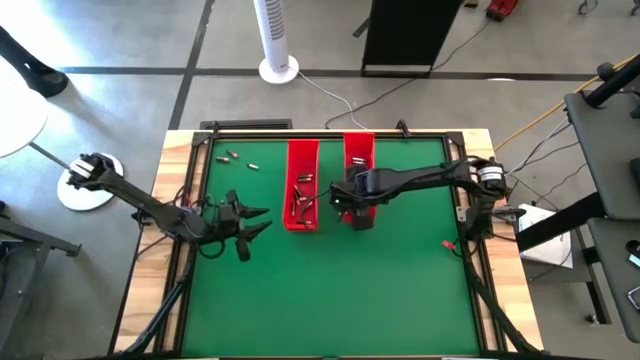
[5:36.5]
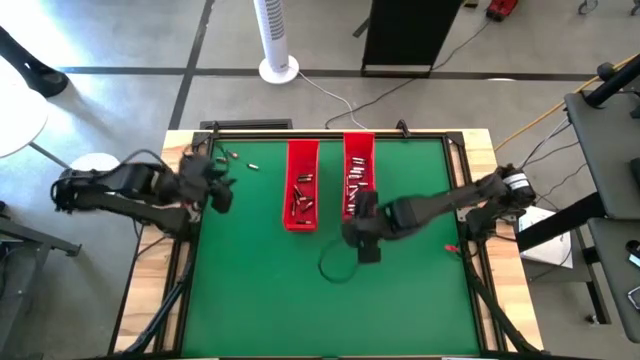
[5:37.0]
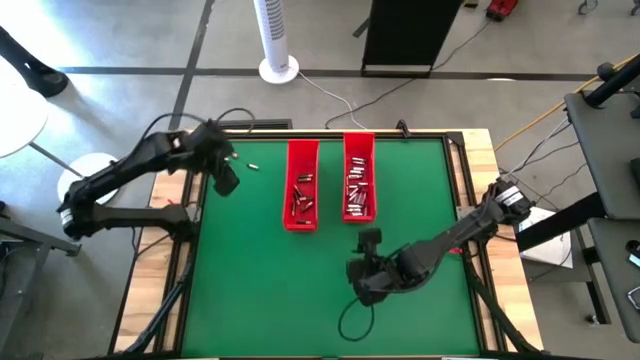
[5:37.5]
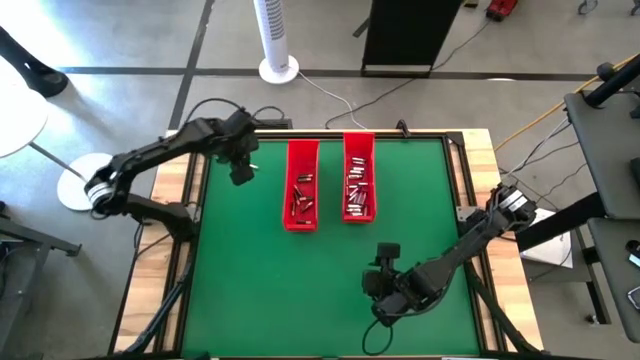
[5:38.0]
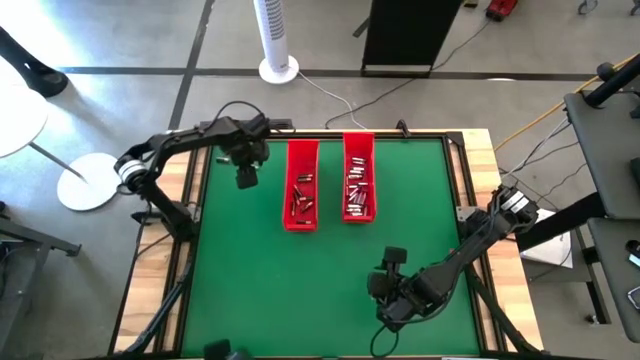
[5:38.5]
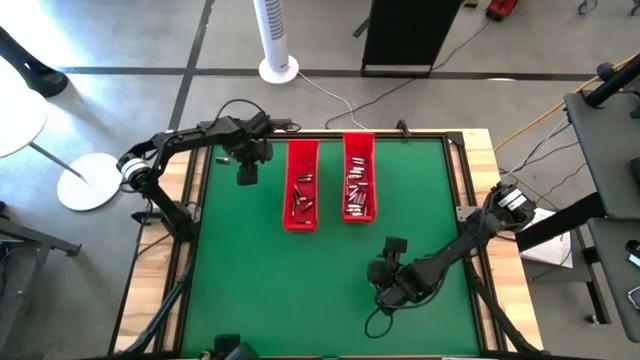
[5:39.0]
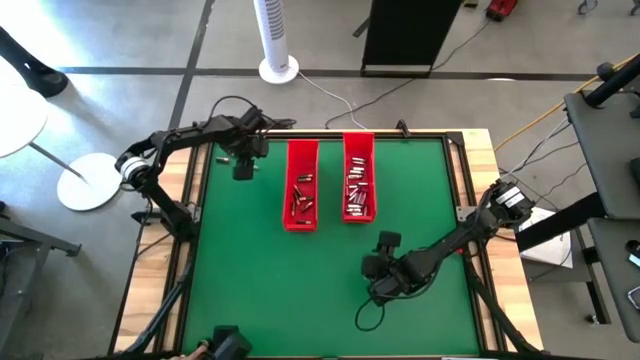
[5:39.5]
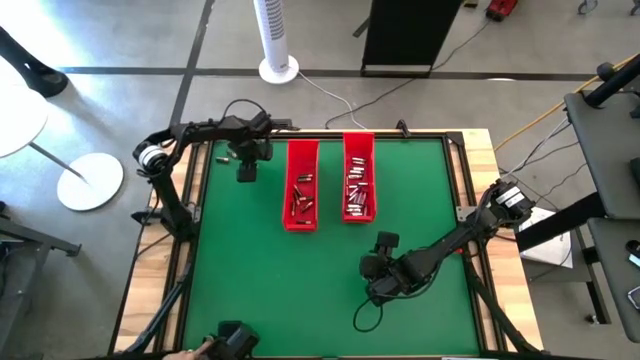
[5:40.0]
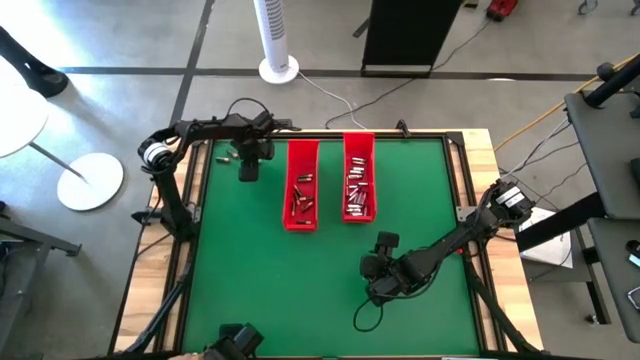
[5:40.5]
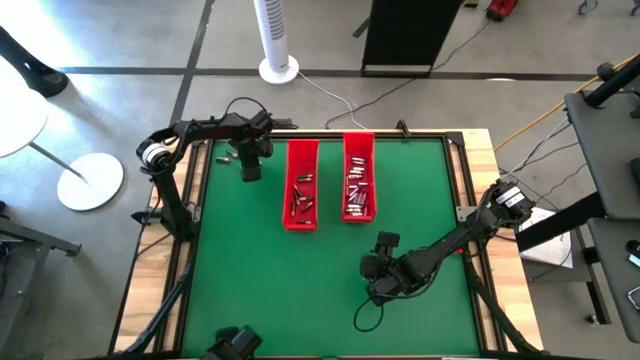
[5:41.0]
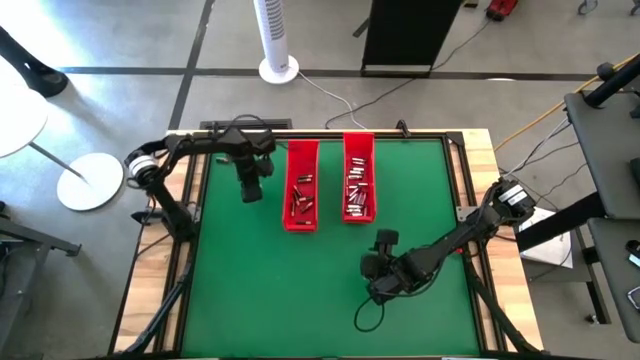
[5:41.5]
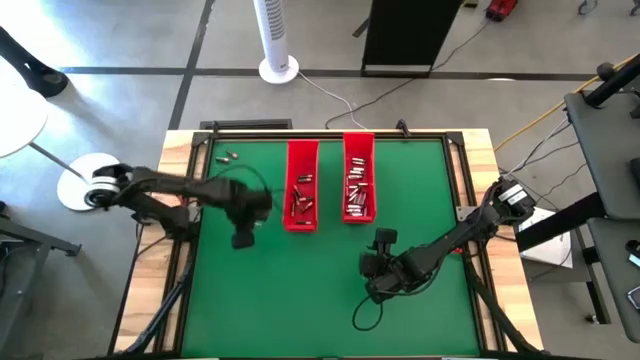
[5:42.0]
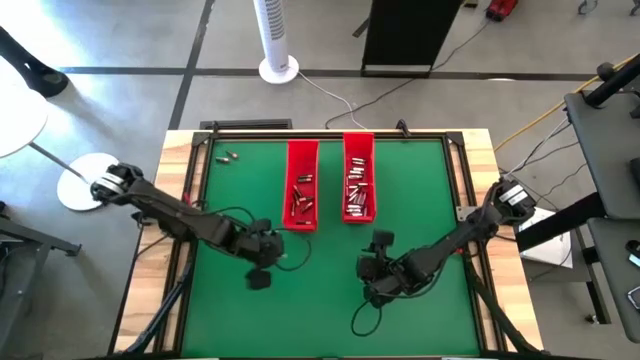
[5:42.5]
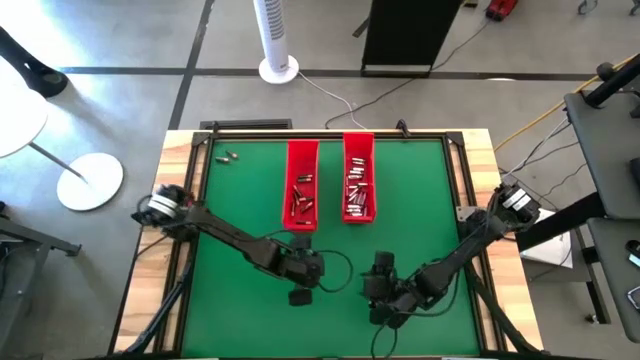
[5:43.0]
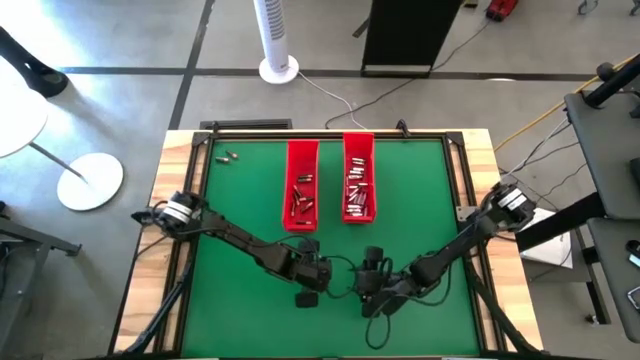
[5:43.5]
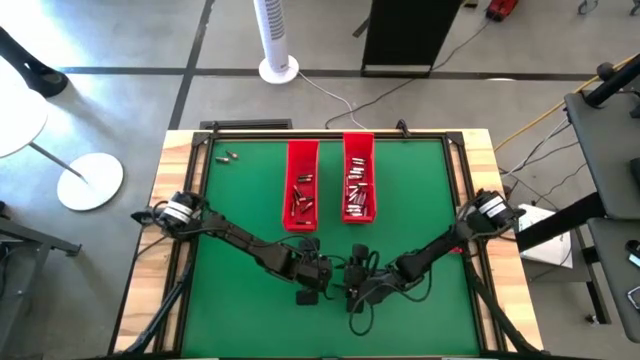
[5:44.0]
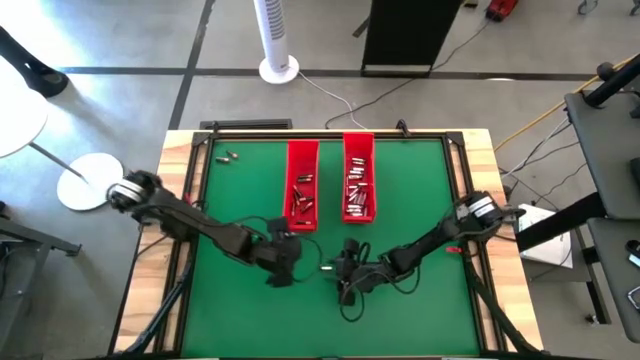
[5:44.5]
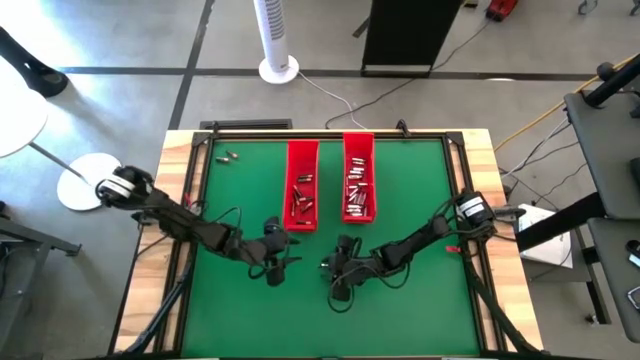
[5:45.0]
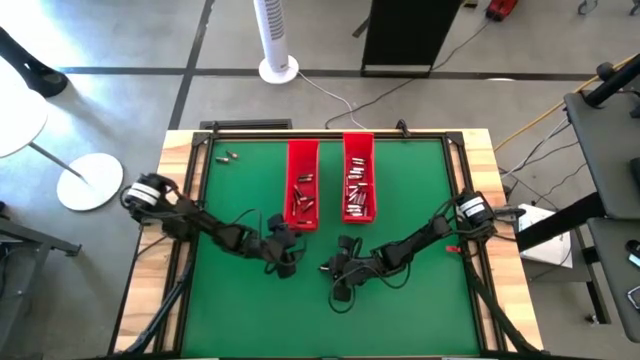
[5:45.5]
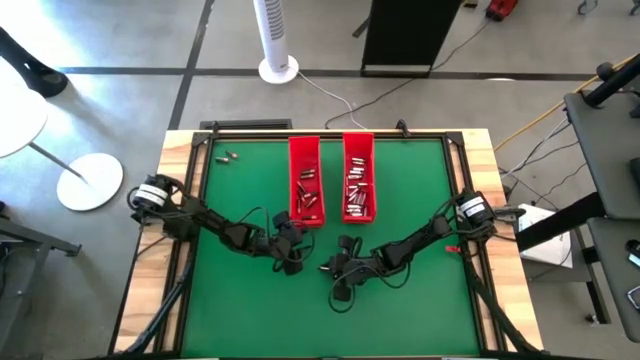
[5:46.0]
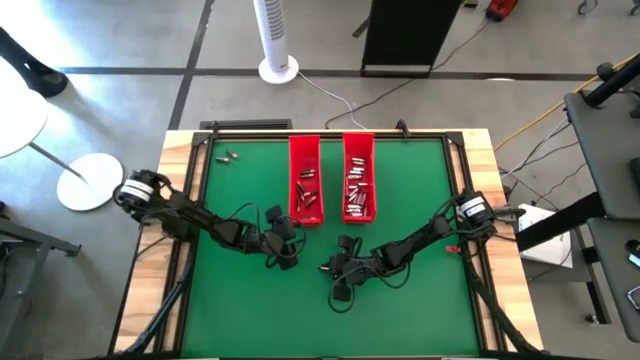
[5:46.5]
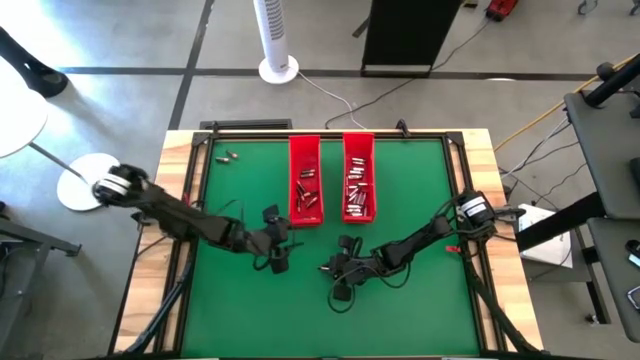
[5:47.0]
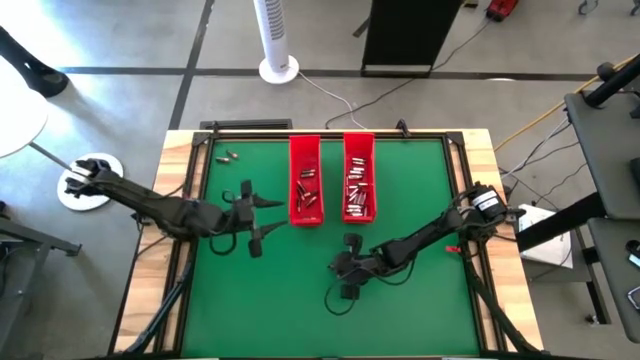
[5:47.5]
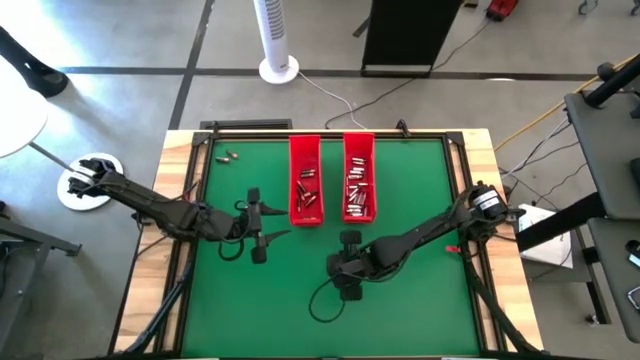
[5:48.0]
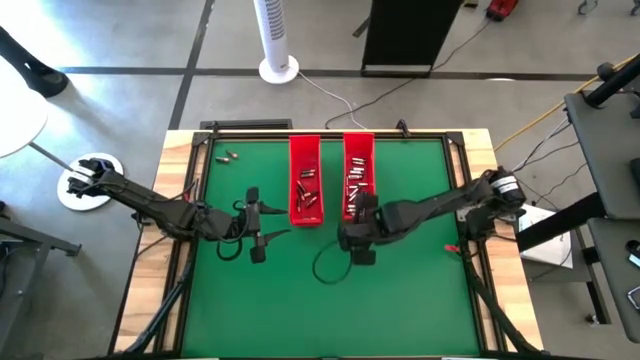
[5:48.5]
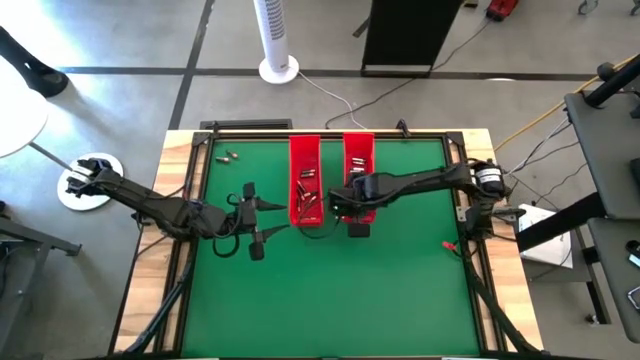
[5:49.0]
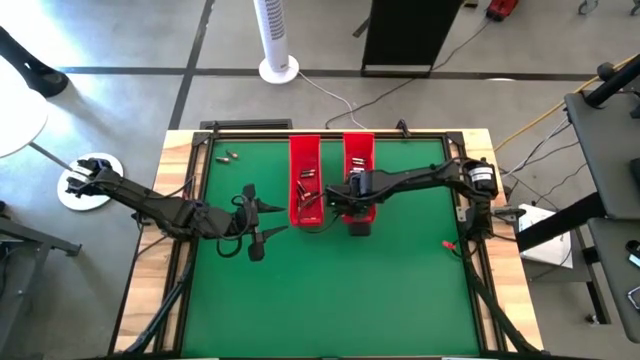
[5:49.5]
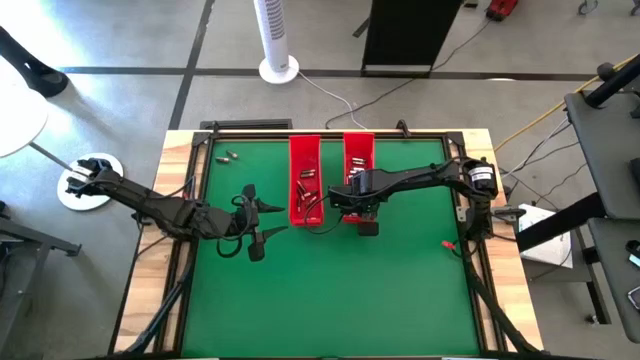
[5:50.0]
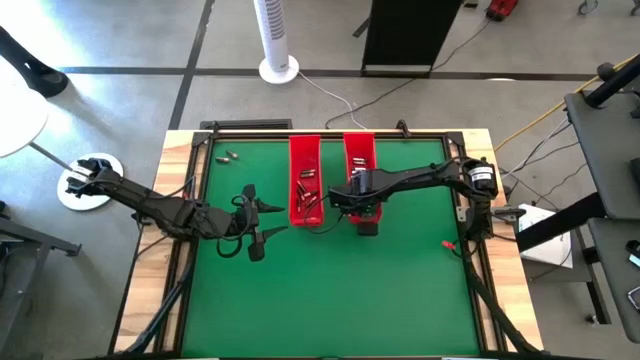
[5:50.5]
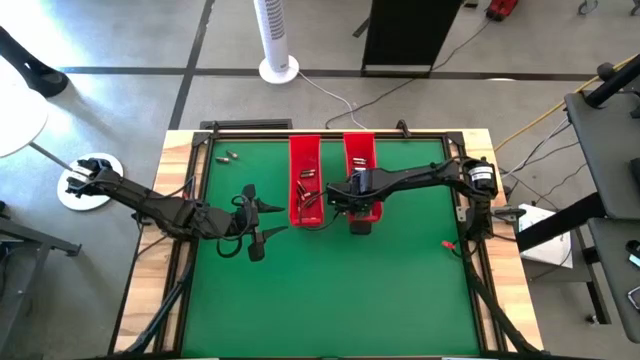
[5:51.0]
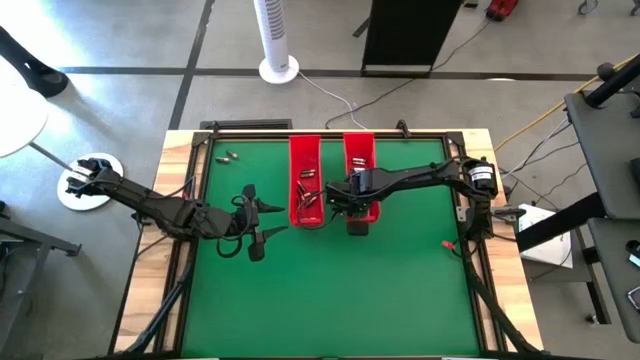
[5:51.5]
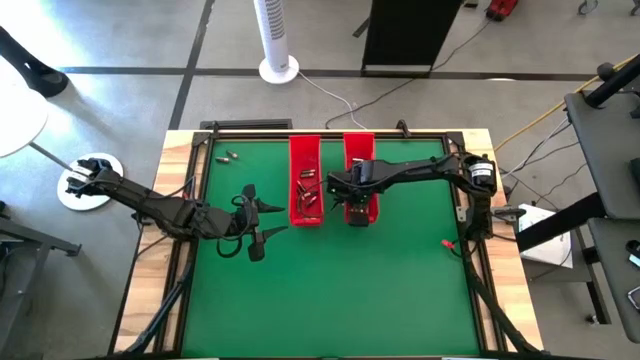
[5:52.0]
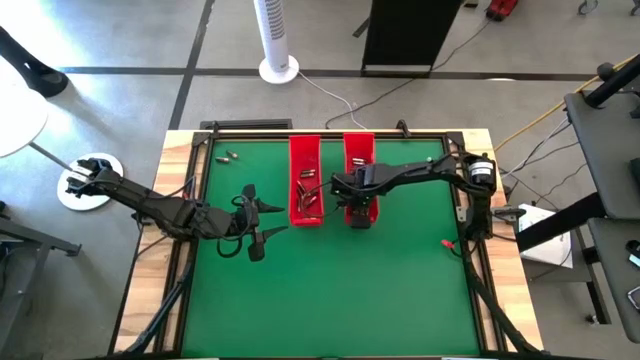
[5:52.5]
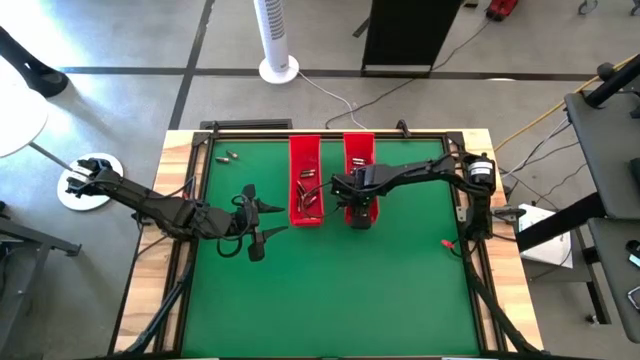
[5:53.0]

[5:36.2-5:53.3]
Task: Sort batteries
Put the silver battery into the right red bin

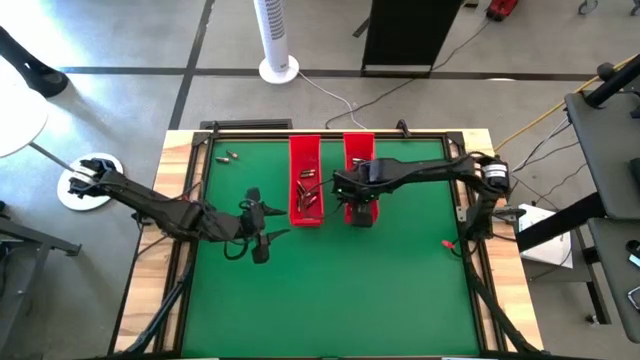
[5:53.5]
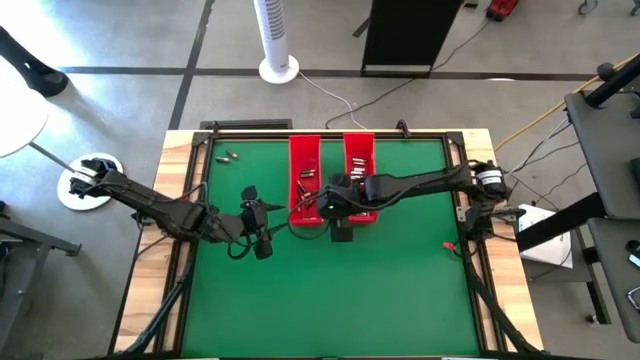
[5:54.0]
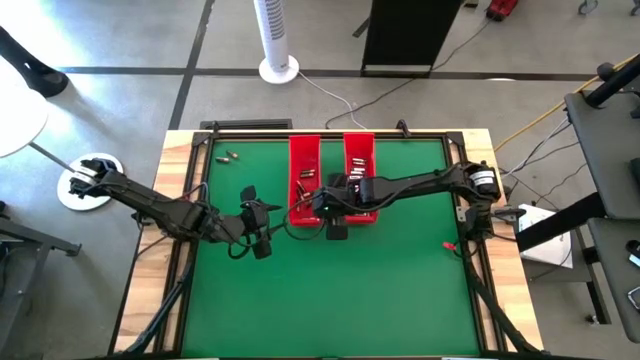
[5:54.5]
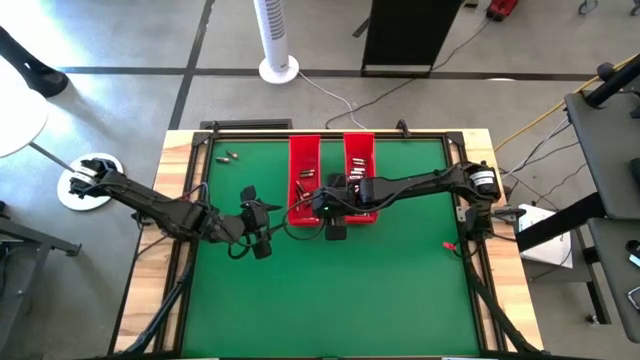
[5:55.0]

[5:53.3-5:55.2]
Adjust the left red bin

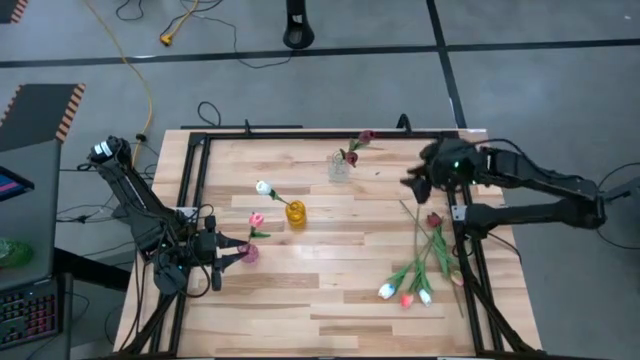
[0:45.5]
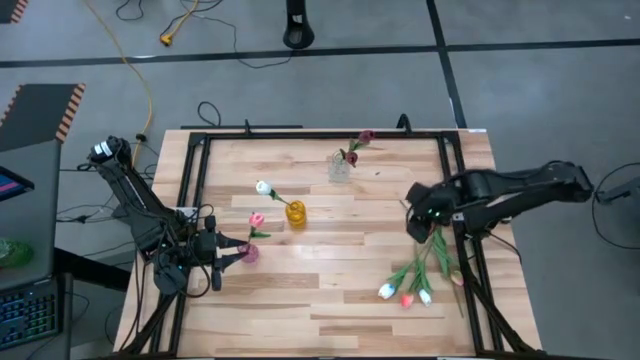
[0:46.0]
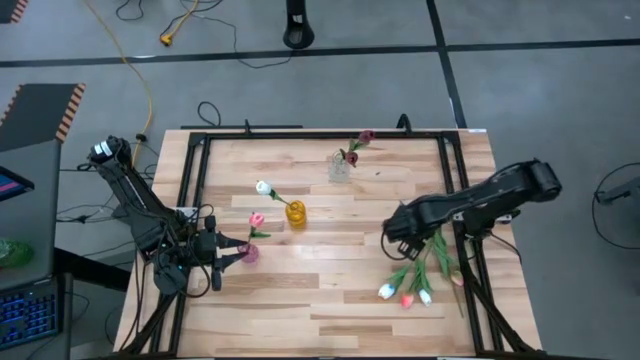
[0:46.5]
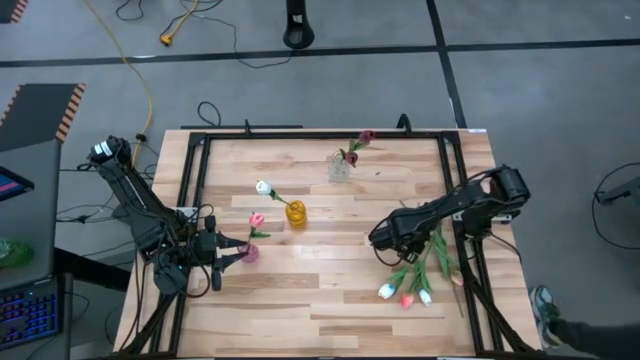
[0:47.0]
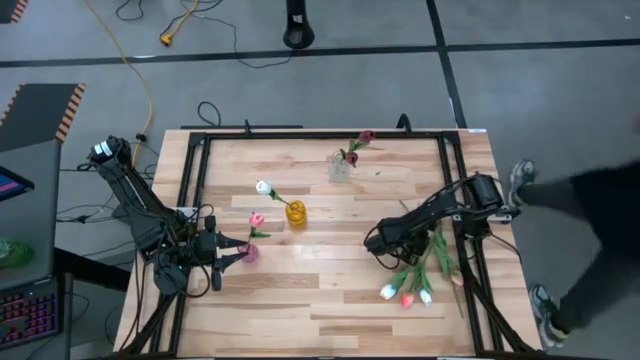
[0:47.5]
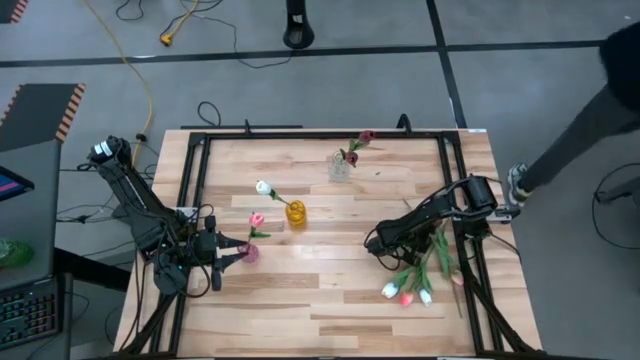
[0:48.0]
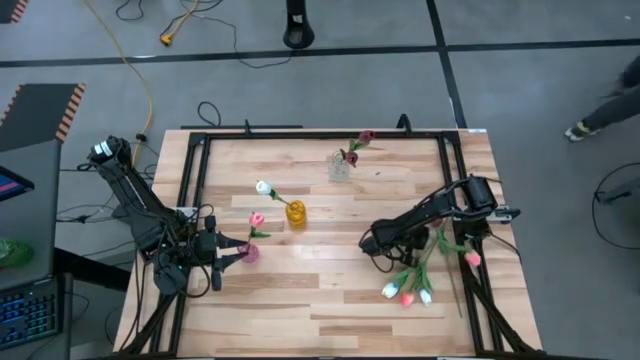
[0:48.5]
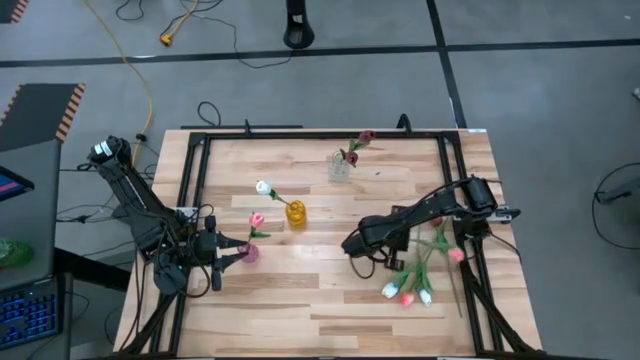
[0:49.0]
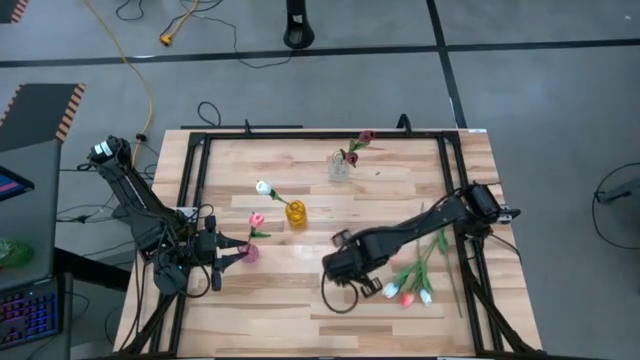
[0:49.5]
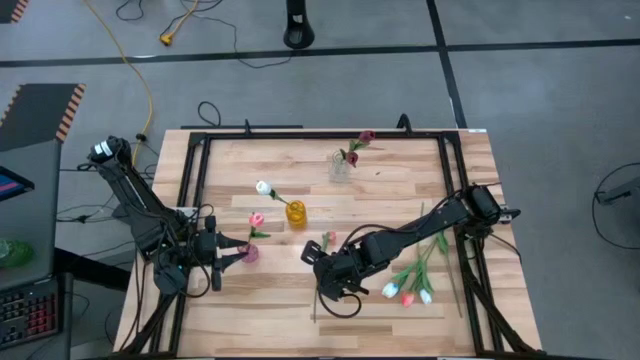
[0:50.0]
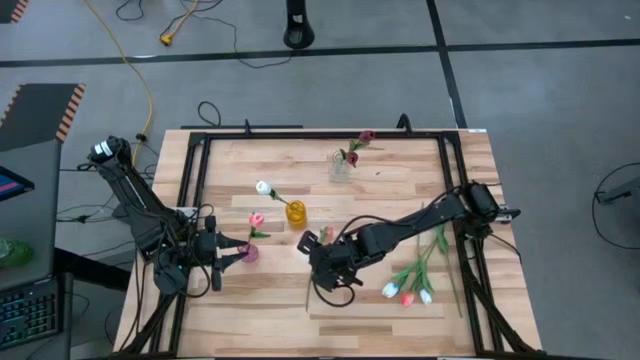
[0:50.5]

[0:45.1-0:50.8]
Task: Sort flowers into vase by color
Put the pink flower into the purple vase
